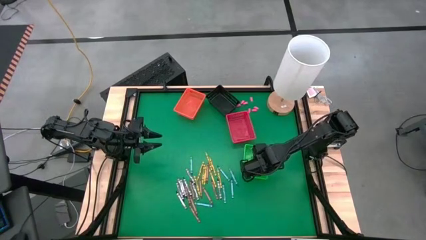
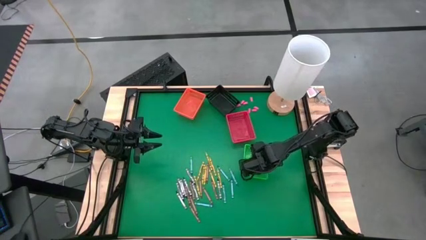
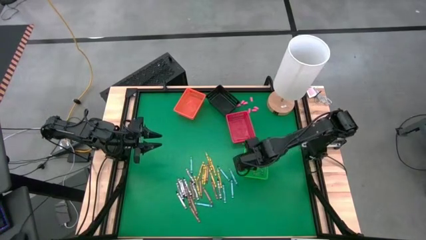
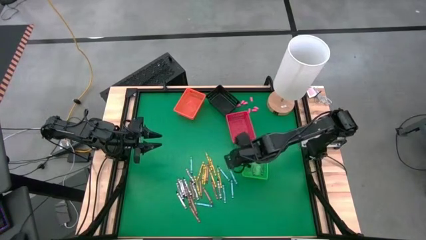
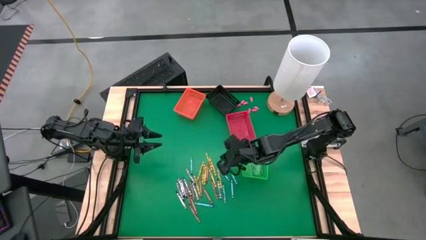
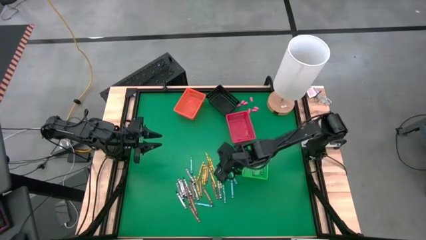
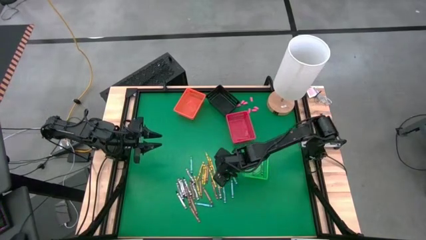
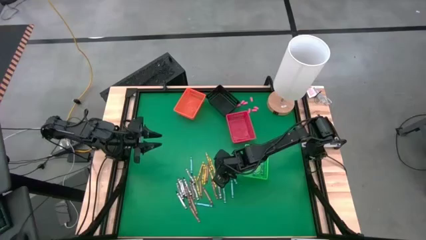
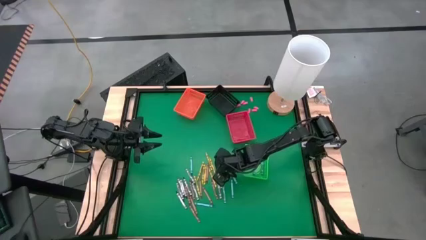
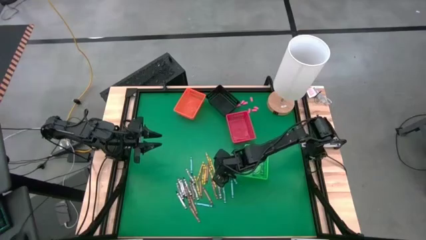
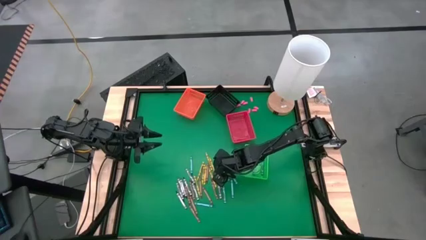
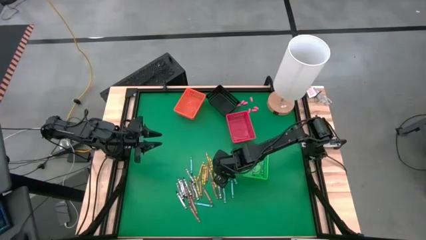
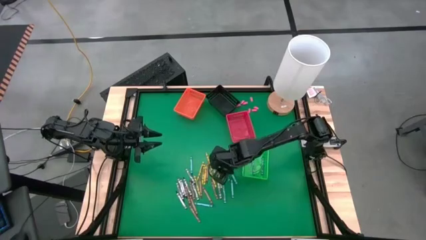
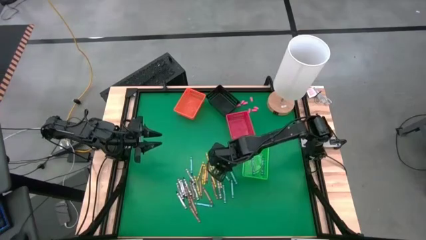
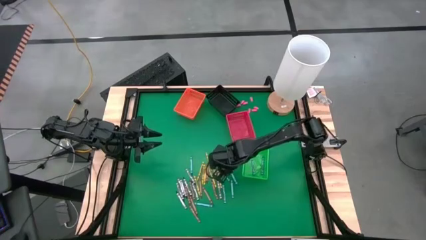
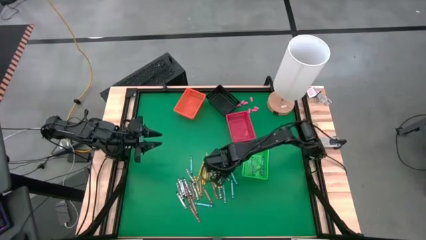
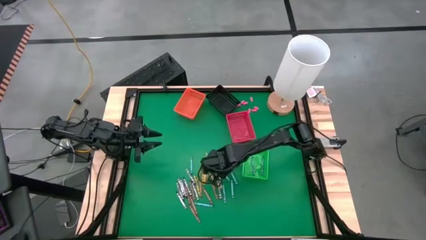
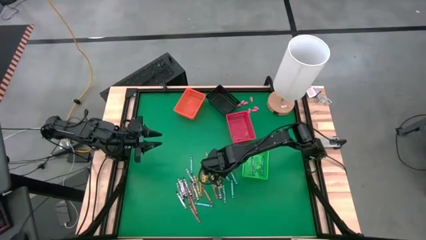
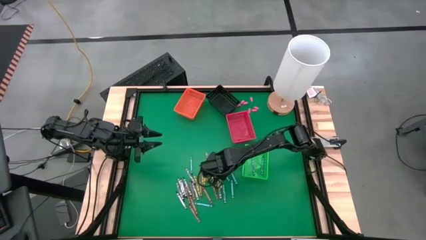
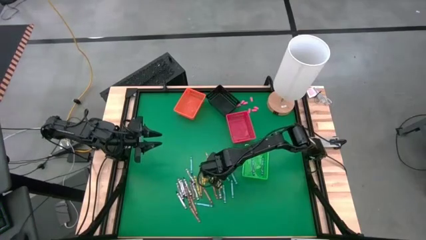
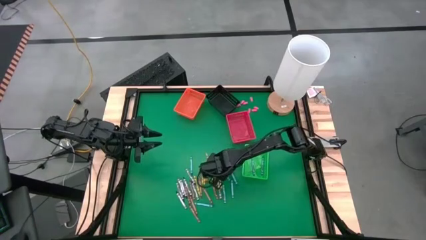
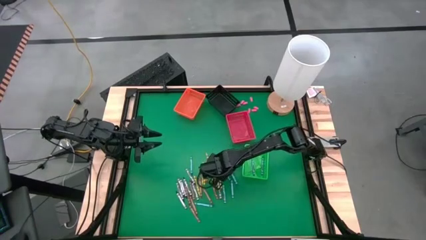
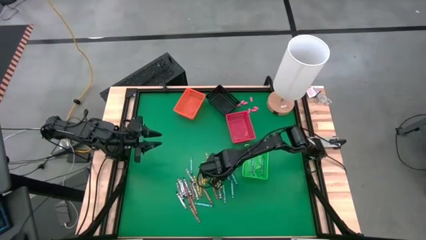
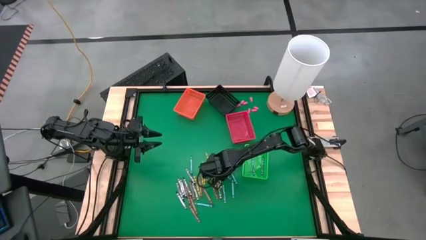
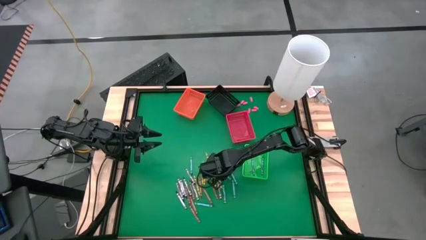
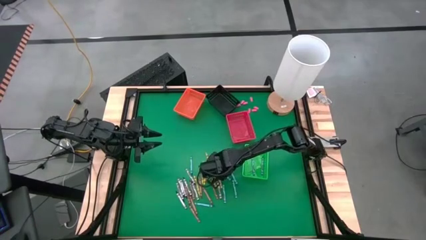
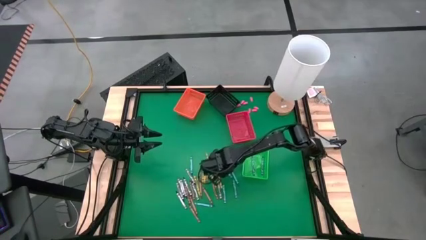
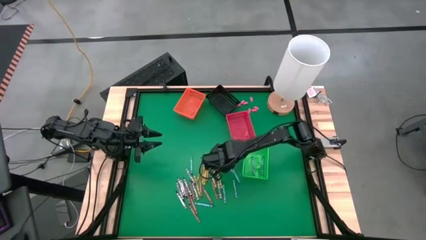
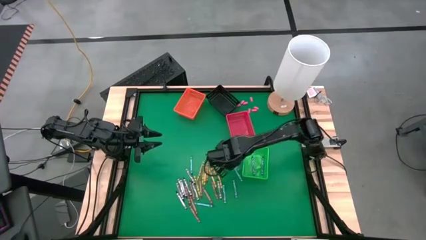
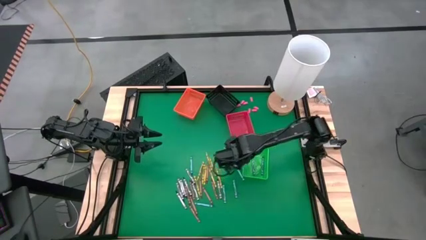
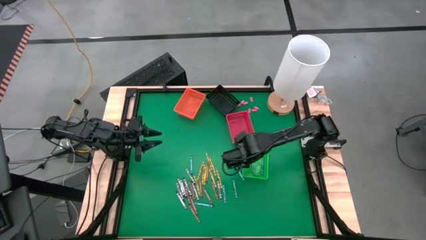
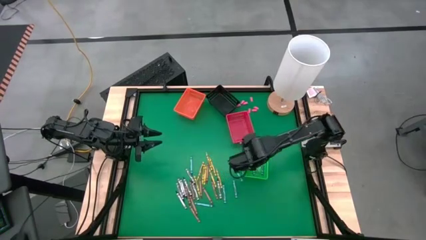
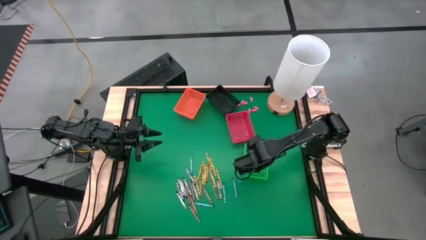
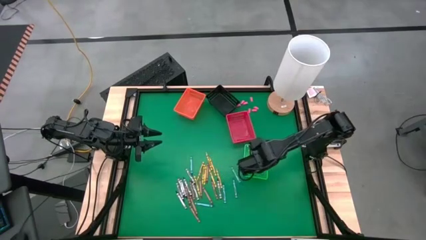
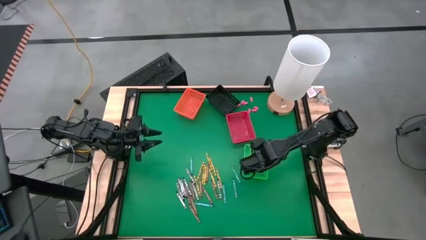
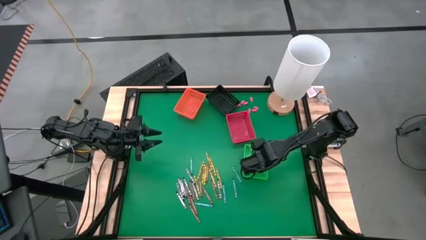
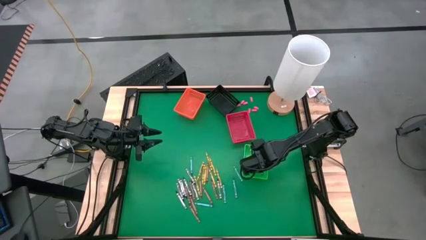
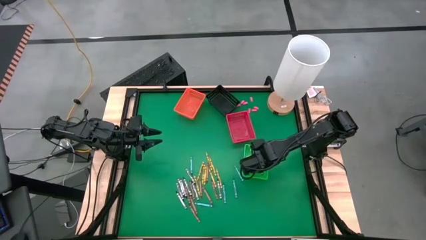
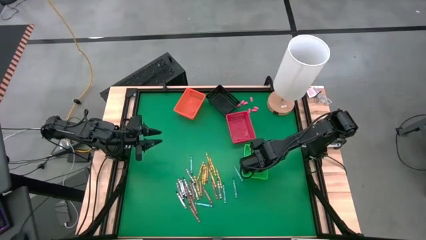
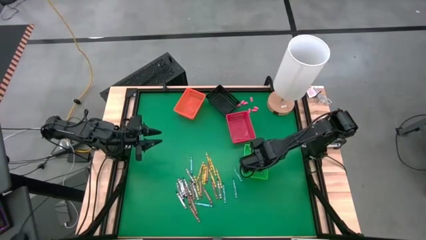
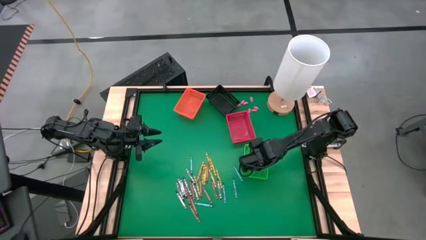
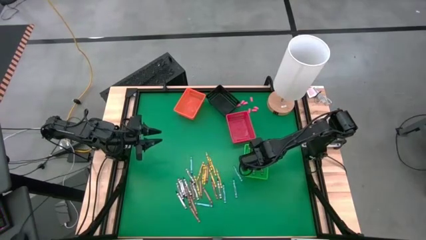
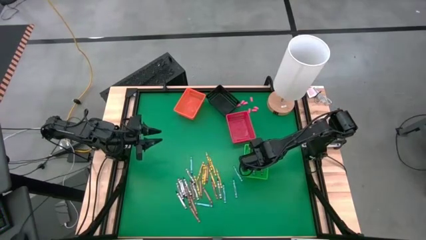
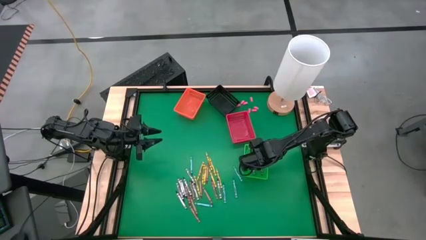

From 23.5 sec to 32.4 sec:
Task: Sort crayons
Put the light blue crayon into the green bin

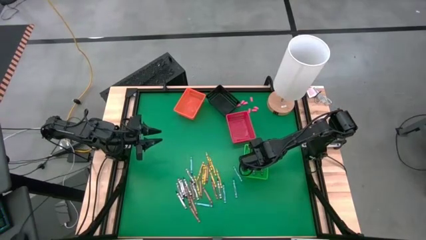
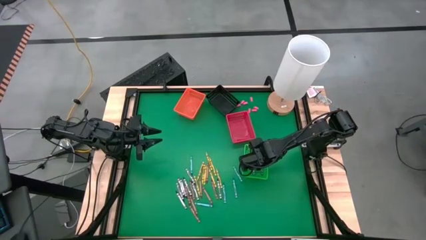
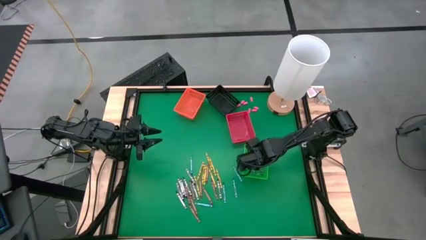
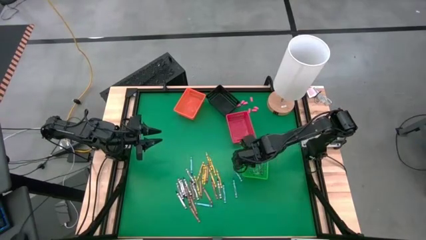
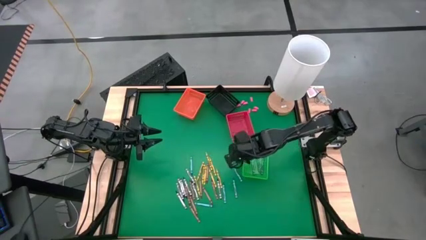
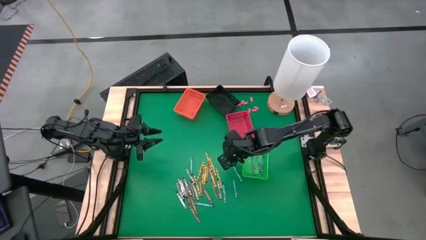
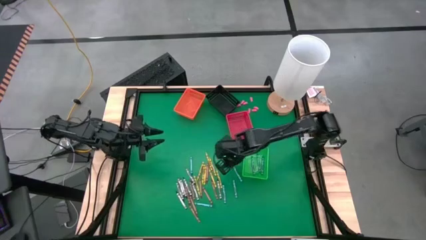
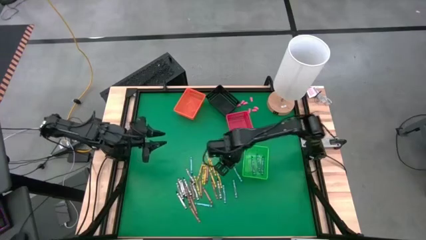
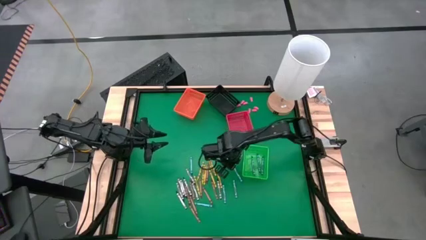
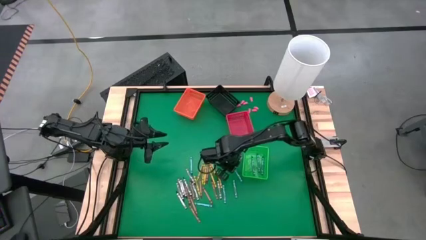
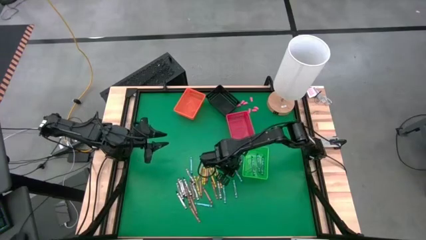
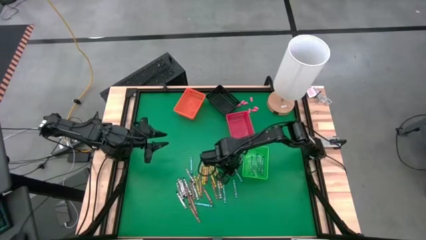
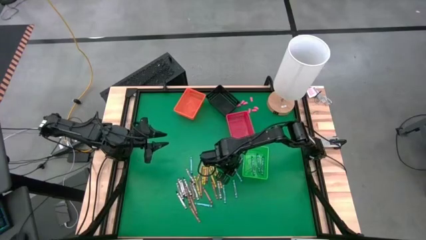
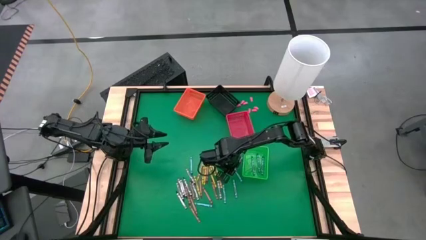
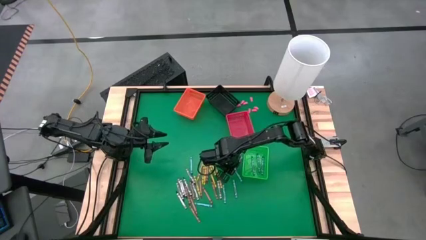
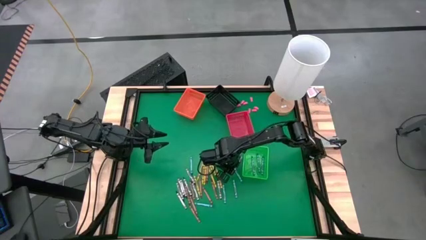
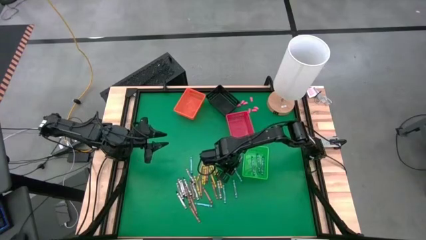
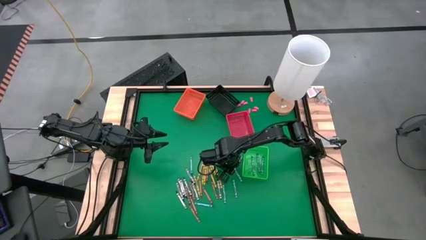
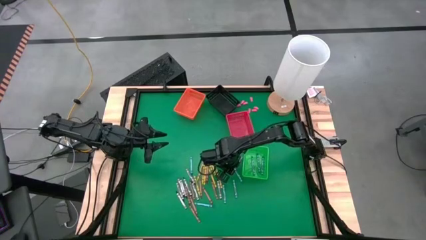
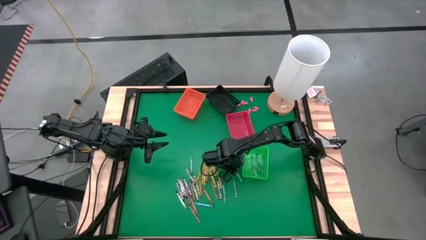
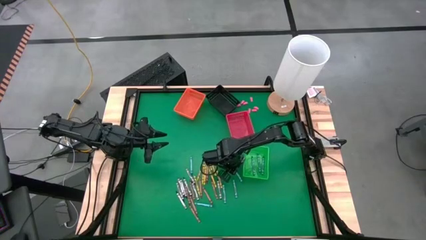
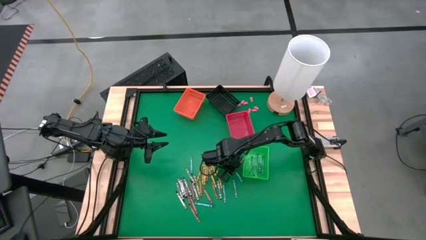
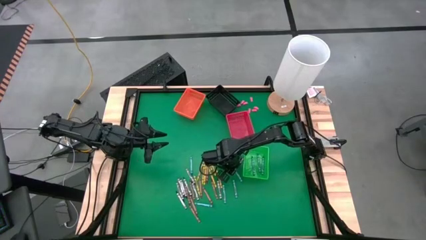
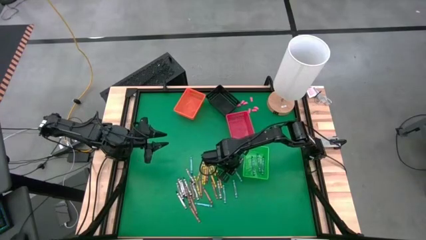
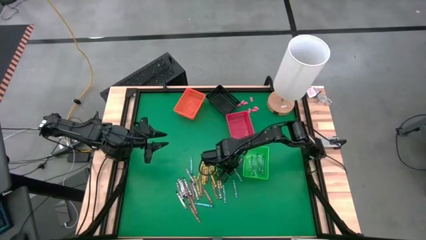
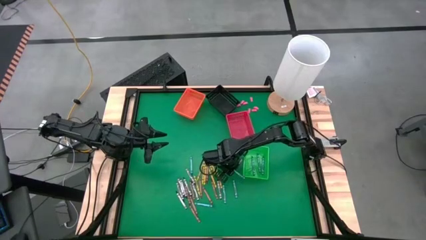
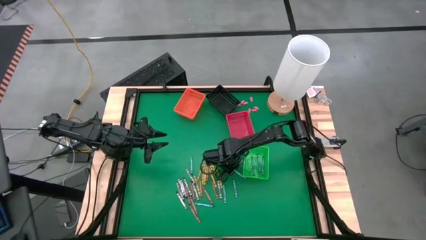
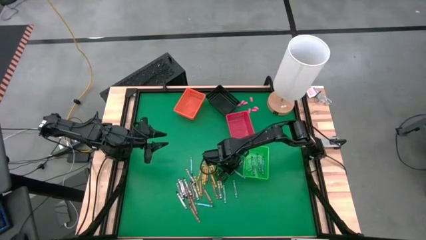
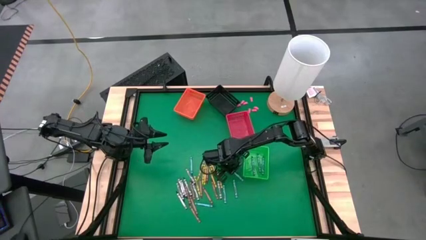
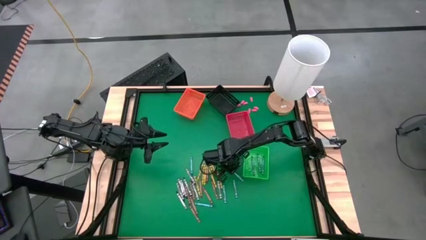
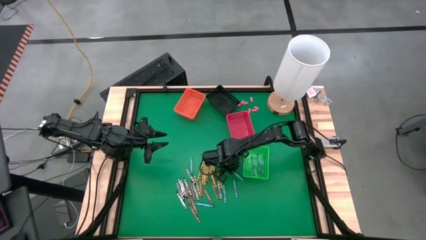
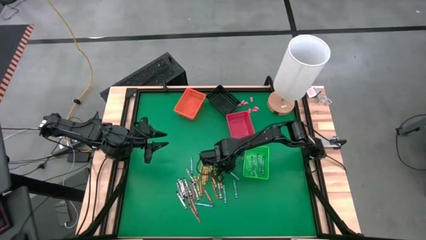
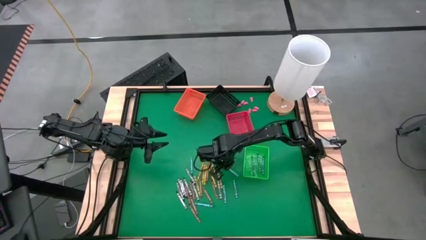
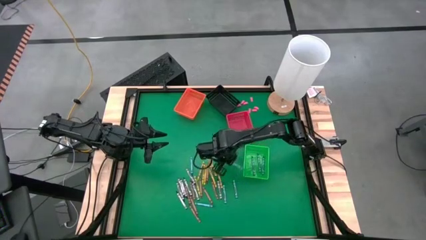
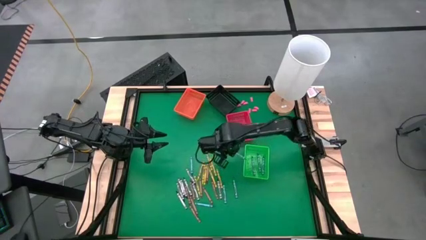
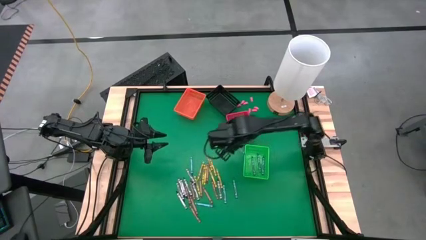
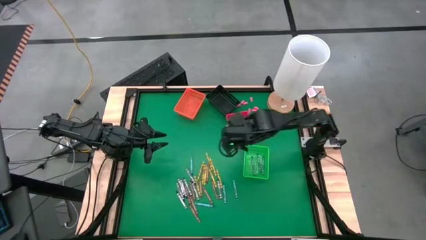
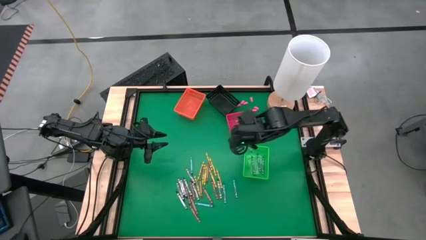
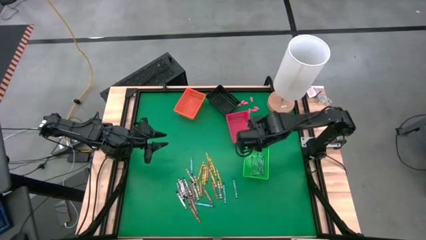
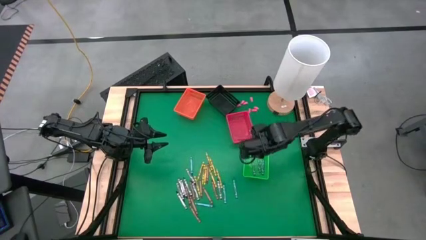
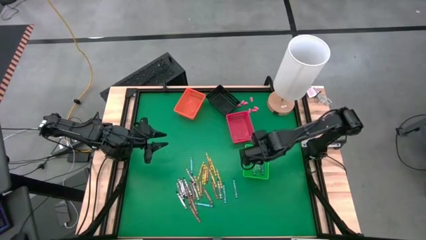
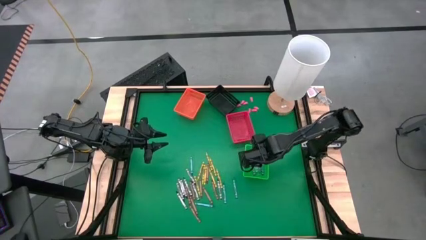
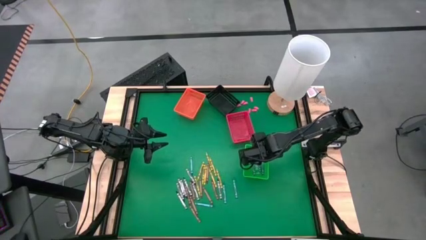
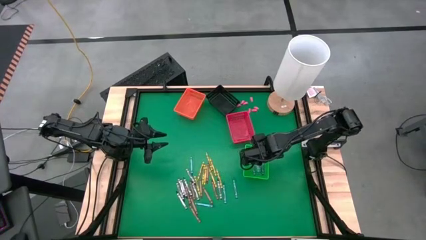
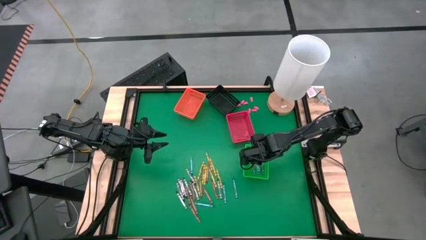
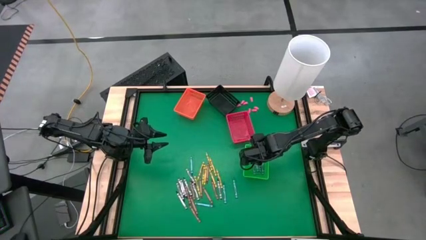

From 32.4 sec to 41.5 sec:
Put the light blue crayon into the green bin
